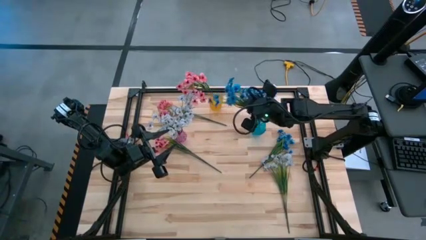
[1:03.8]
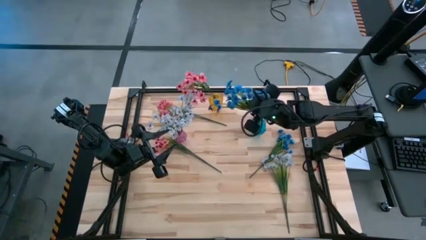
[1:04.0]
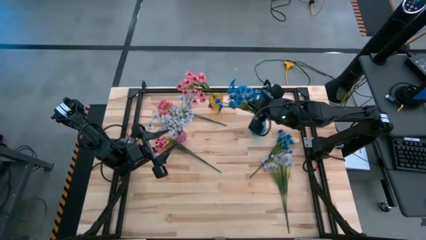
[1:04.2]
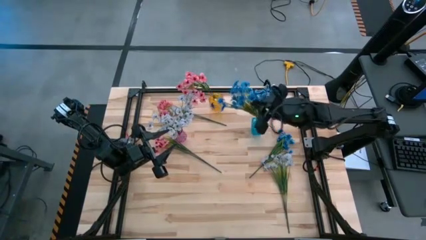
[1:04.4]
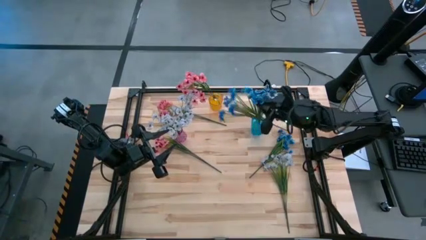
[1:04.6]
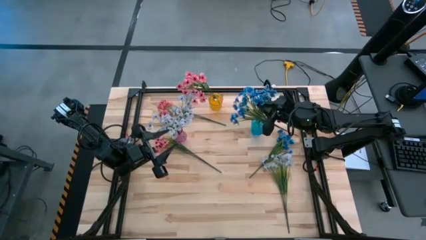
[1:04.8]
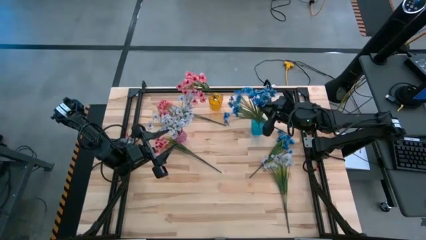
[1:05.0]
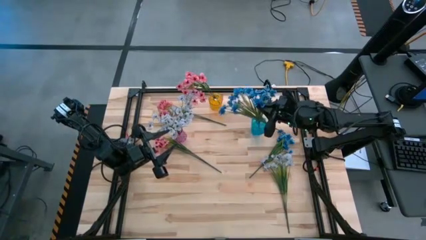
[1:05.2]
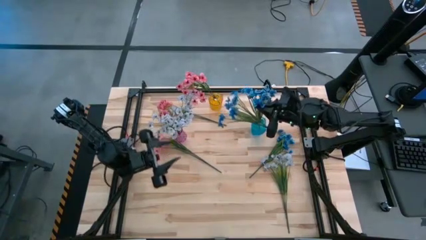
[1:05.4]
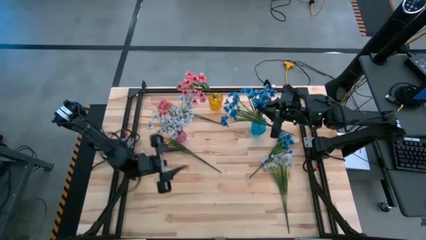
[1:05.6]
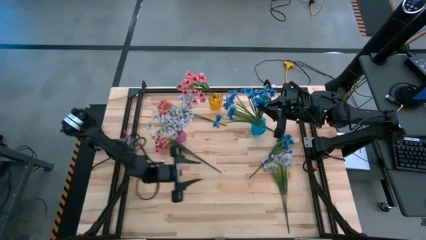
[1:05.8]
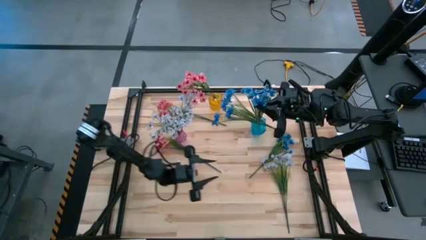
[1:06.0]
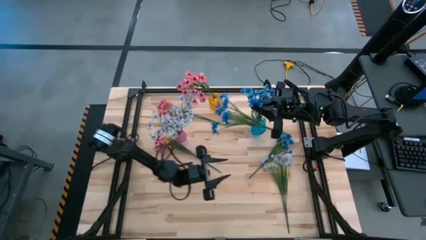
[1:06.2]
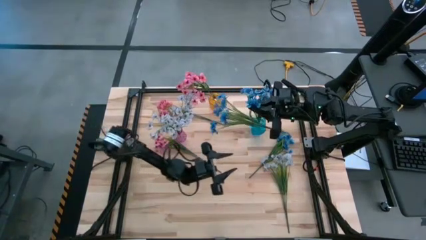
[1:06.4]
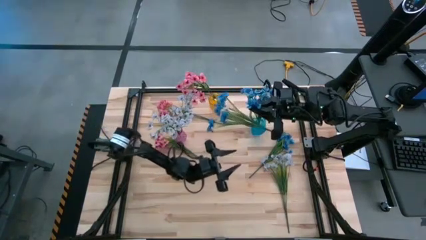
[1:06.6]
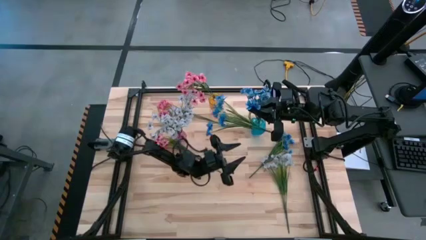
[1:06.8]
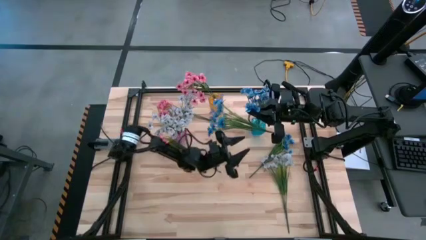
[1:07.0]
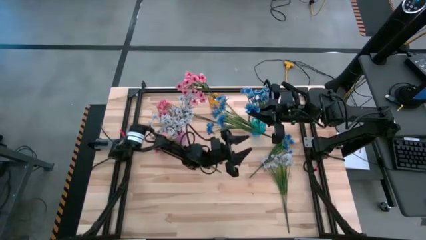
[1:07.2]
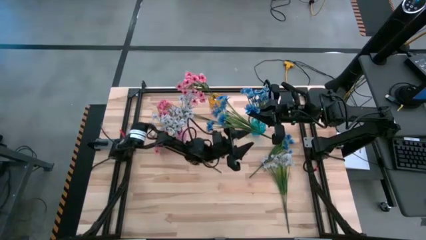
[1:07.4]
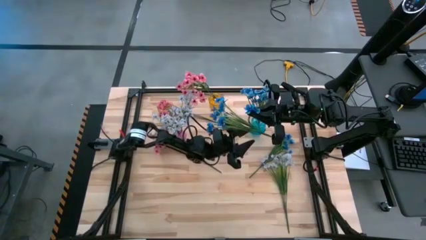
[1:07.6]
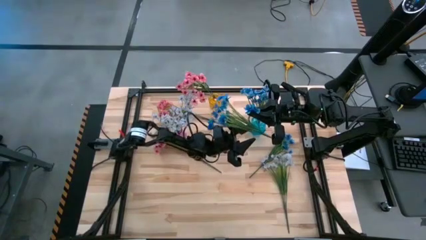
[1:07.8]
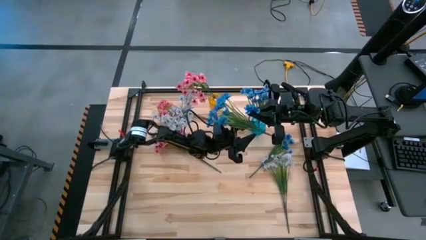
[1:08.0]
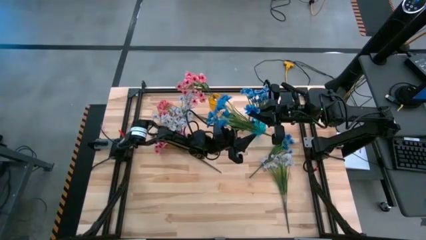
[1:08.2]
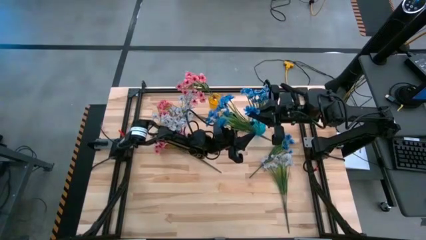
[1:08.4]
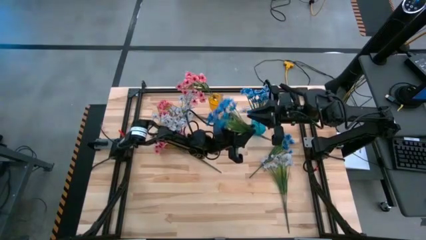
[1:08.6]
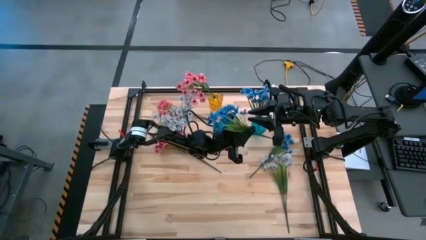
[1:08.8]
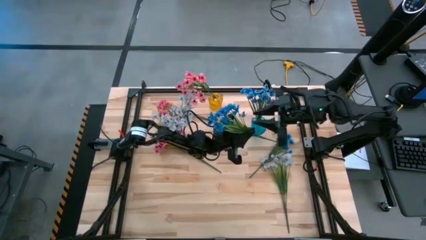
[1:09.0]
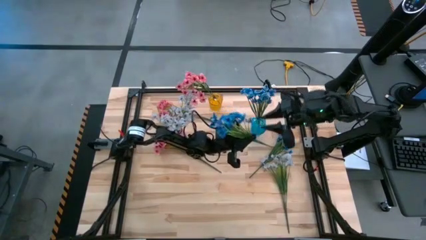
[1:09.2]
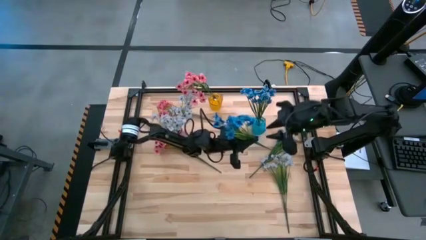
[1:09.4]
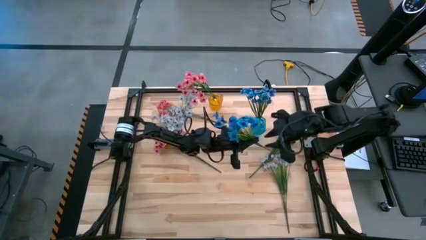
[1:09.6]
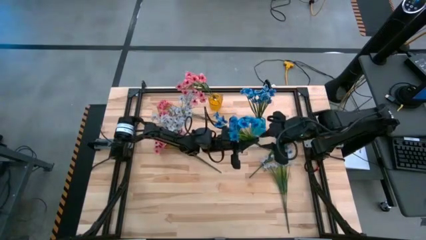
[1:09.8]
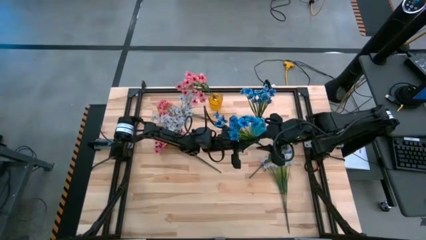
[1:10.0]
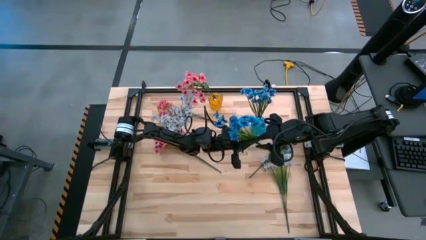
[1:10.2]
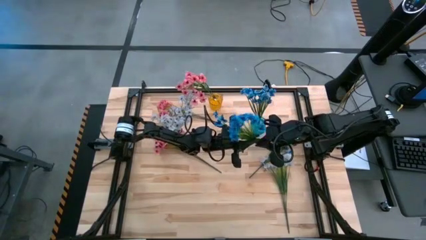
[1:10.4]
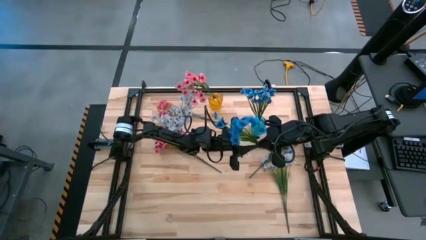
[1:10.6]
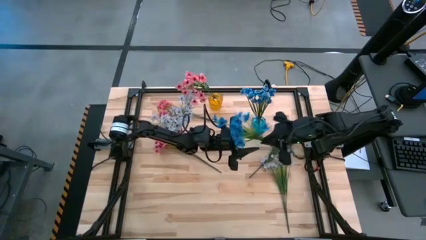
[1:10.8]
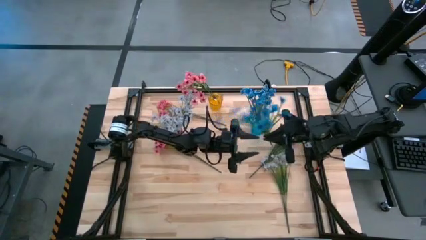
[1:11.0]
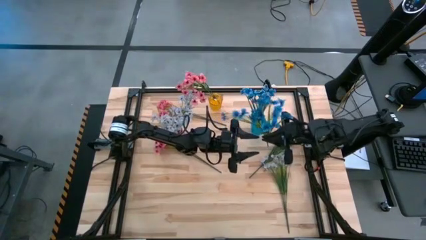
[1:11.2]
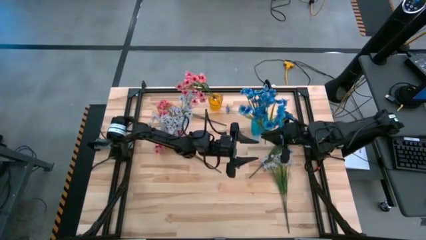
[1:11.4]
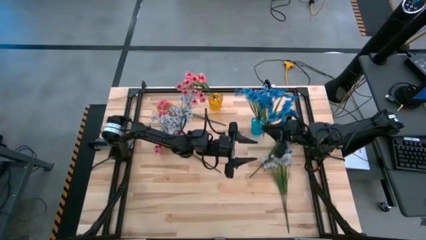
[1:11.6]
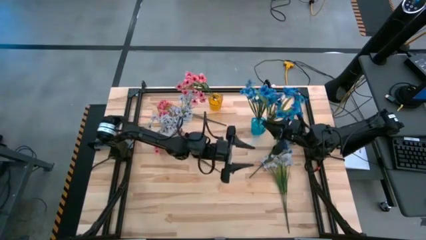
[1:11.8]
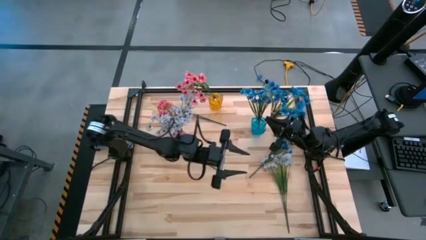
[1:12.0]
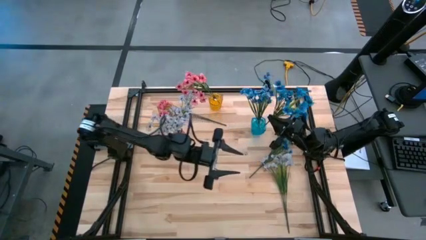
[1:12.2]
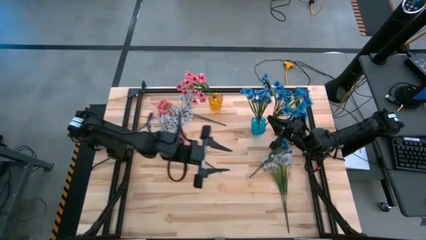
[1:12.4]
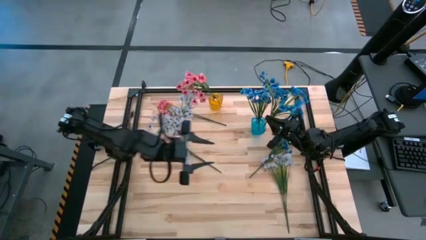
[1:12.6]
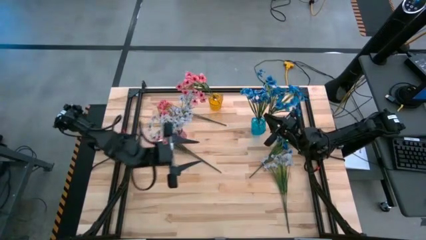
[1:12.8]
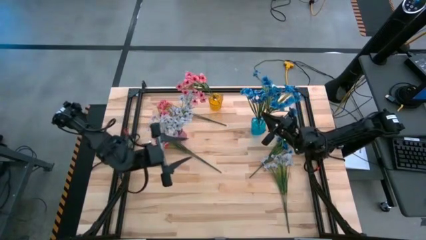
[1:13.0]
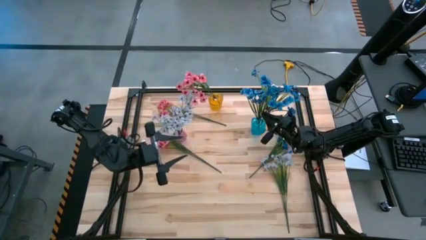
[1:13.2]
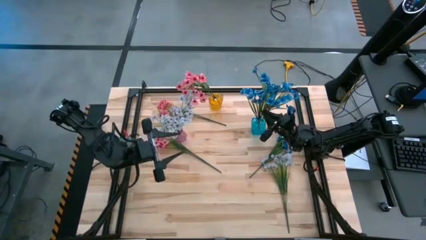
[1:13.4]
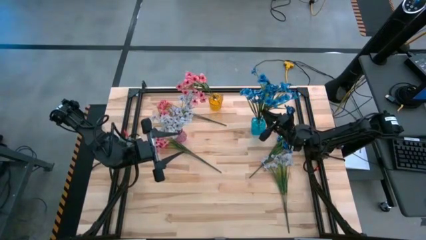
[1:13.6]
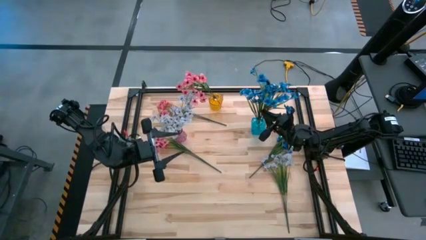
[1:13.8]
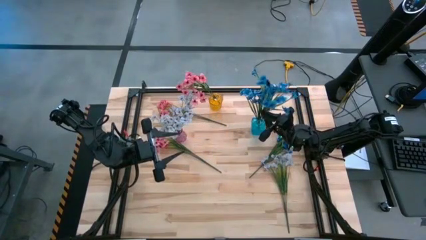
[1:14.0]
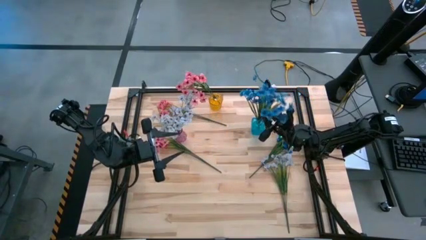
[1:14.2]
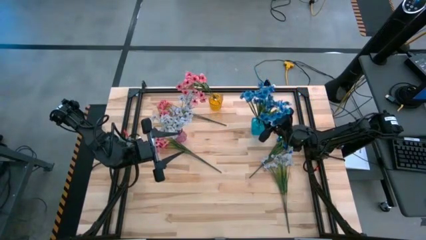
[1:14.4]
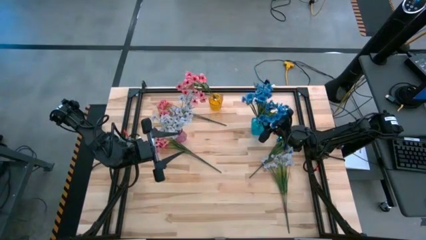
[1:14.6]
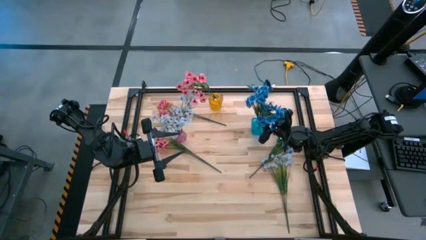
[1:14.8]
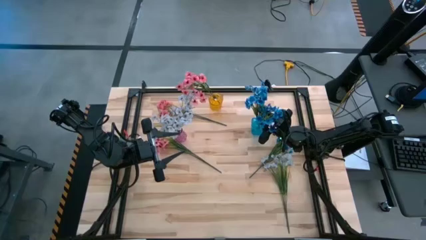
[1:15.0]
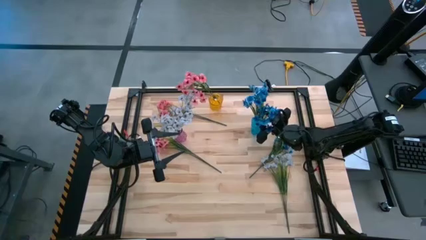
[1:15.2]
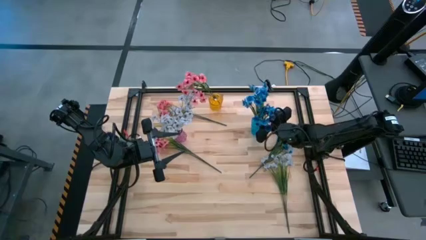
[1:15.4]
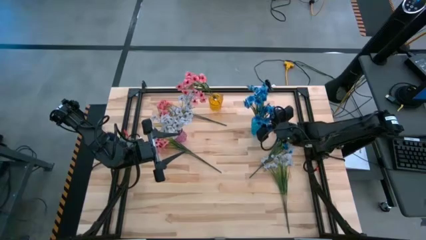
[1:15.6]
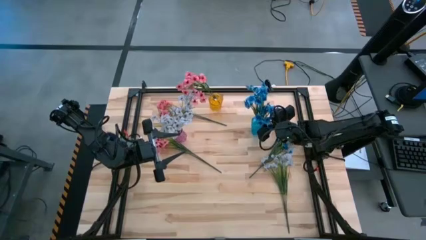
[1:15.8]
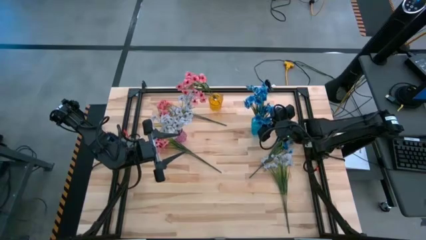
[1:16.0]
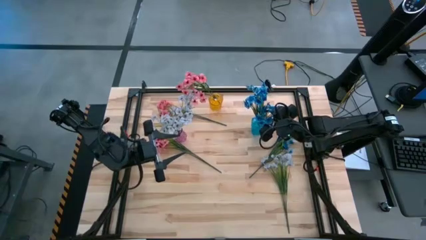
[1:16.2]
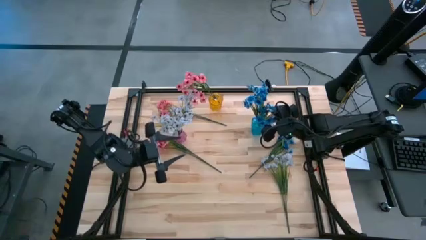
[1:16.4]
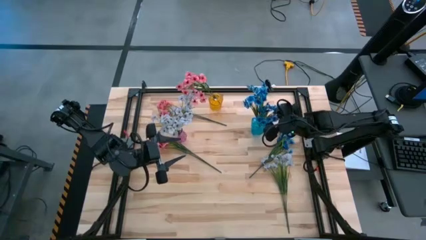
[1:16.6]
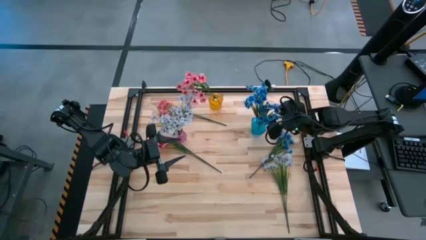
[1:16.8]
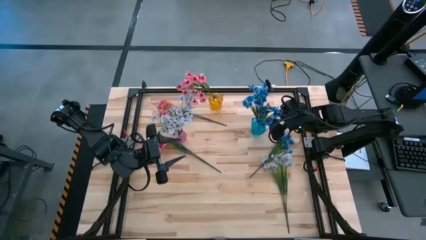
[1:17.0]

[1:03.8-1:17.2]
Task: Sort flowers into vase by color
Put the left blue flowers into the blue vase
